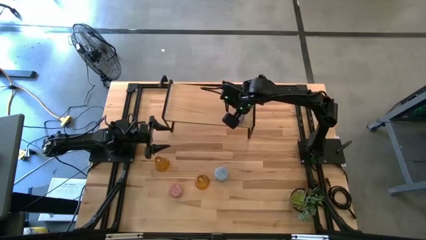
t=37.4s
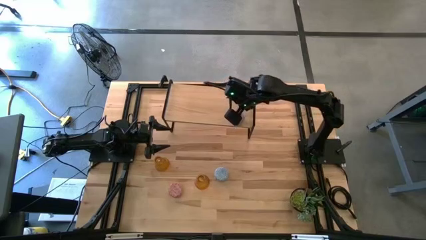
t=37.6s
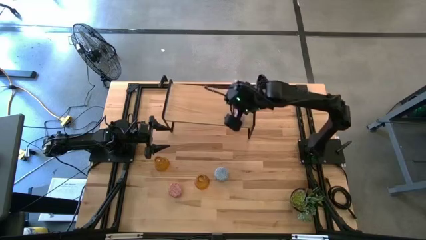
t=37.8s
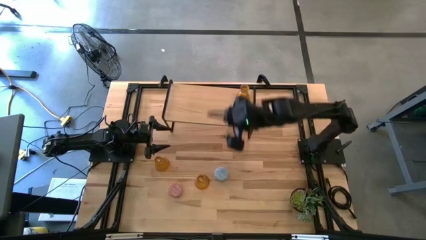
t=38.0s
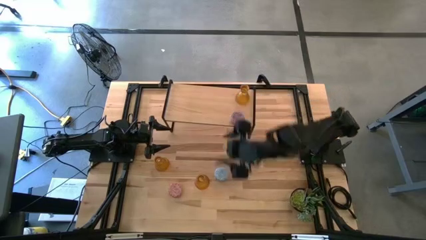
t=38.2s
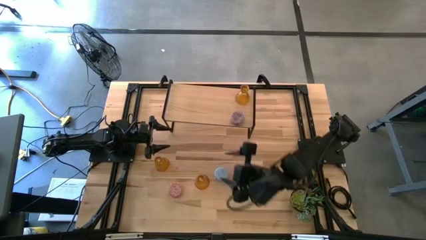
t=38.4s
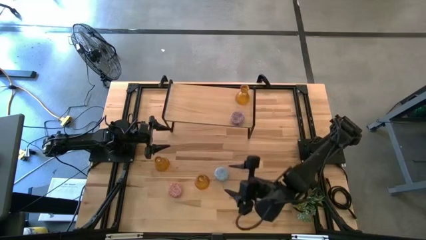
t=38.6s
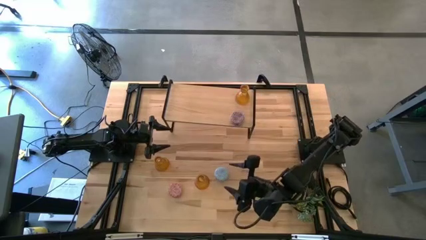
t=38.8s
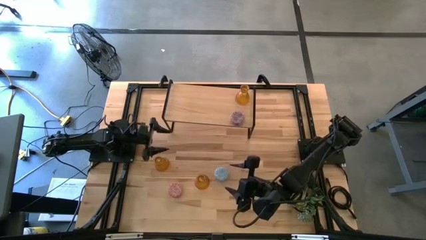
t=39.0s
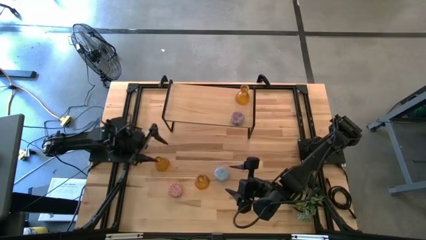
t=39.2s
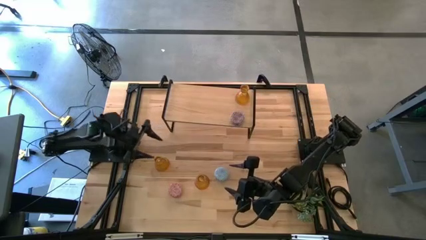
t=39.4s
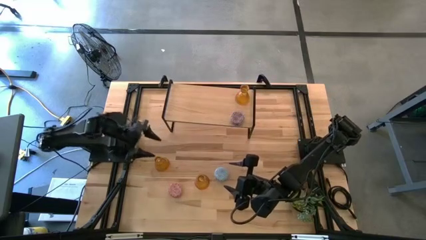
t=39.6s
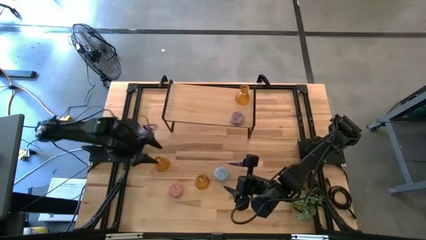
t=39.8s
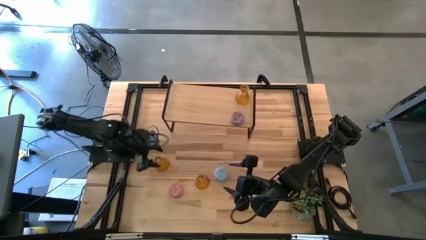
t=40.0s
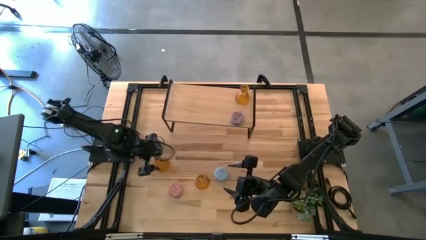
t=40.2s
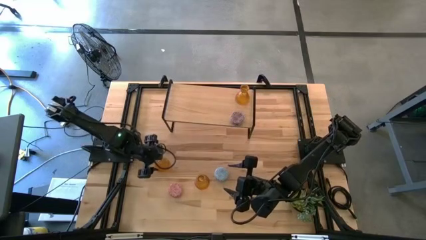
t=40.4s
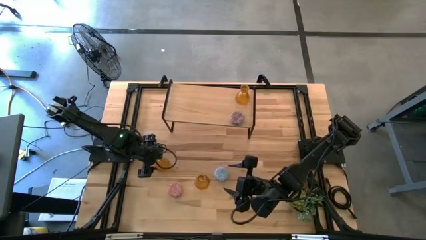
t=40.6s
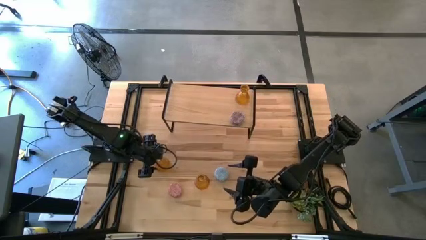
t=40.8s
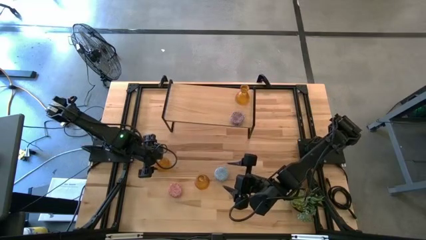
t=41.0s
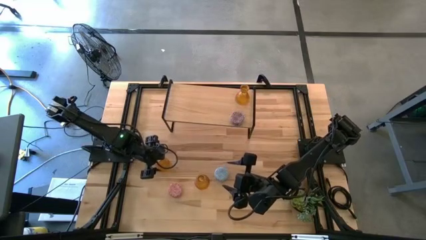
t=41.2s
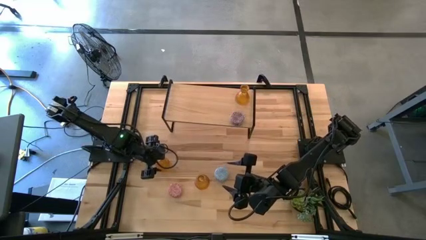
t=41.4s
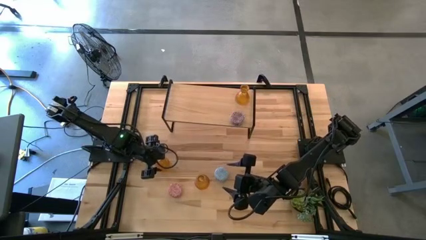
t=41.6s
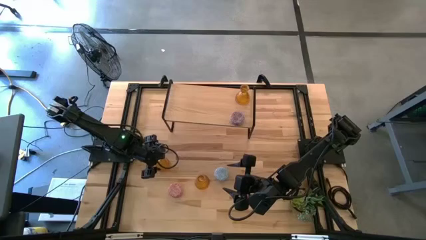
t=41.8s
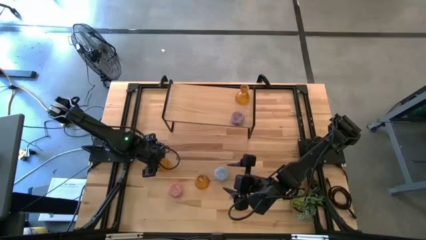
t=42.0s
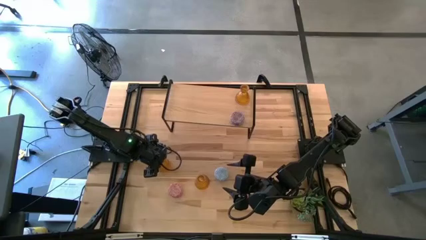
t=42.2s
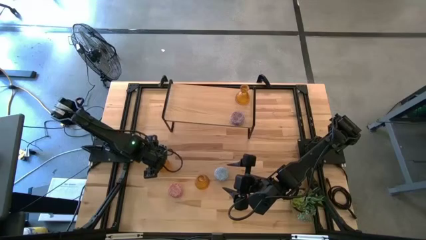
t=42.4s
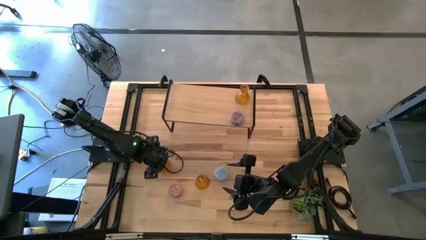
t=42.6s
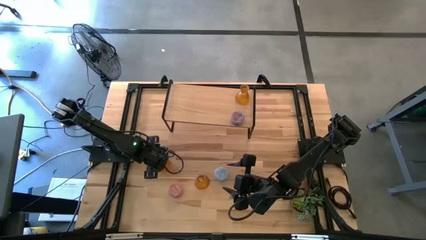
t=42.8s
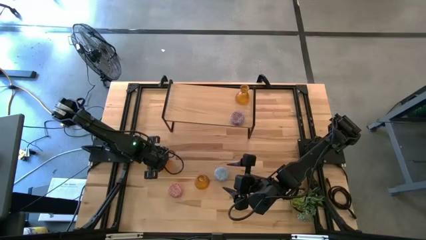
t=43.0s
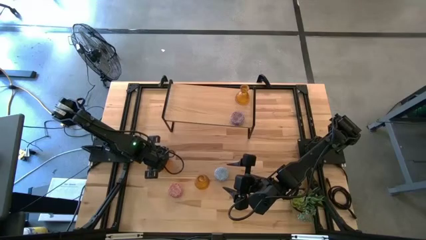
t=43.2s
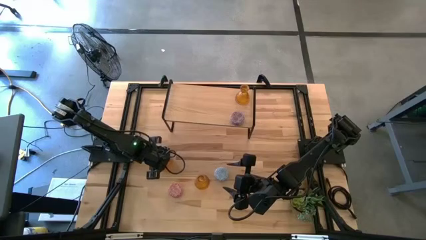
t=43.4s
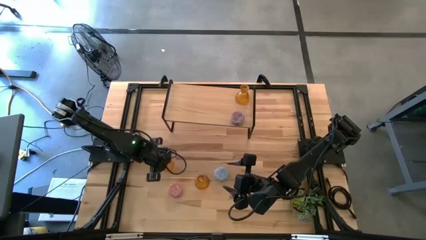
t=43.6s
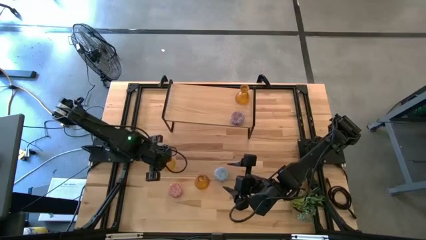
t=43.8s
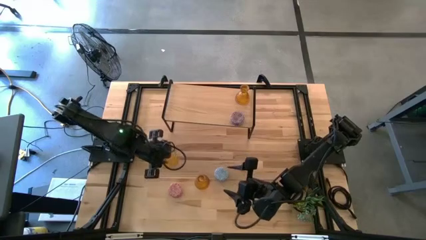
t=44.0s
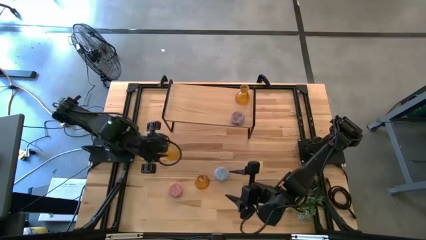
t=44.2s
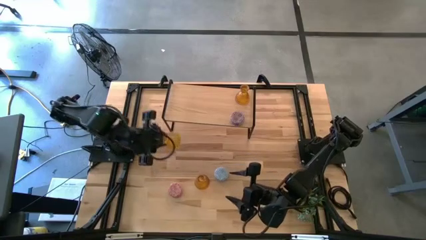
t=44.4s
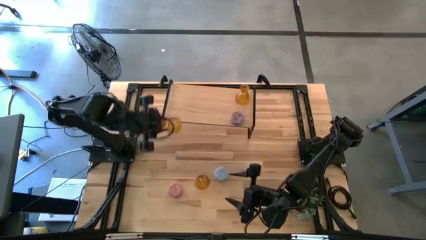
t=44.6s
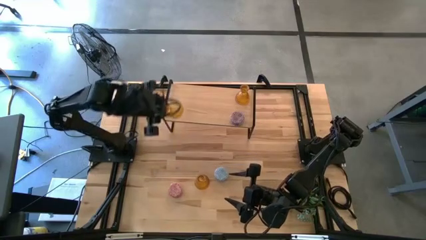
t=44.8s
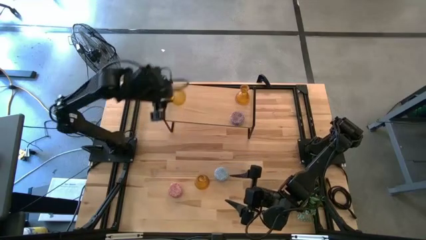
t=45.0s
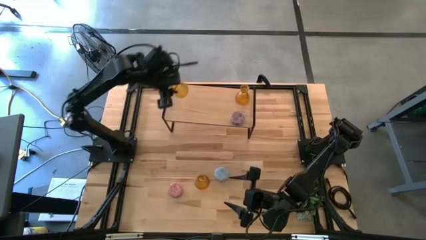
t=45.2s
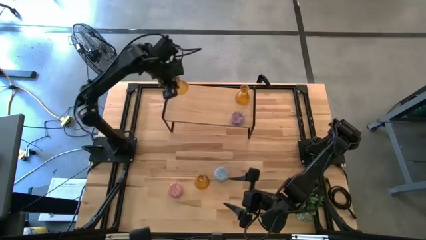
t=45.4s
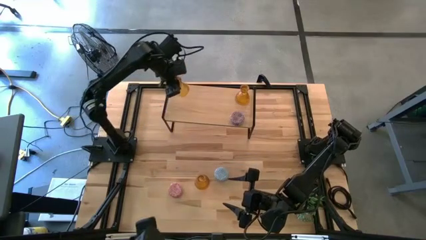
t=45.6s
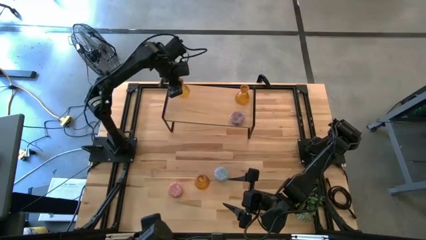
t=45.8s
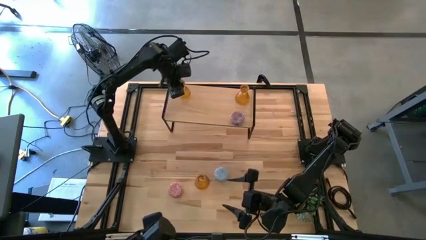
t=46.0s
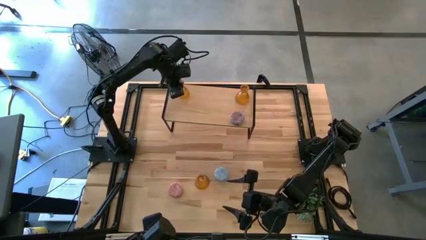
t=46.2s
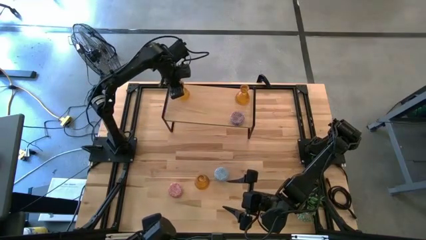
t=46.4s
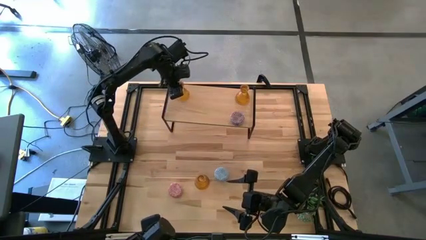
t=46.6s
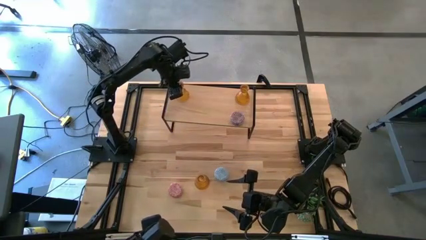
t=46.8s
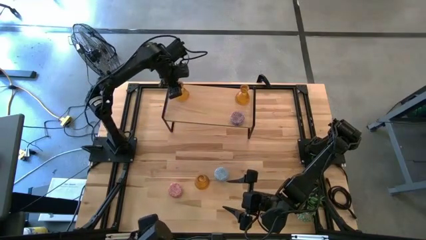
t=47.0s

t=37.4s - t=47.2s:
Task: Pick & Place candle stick holders
Put the left yellow candle holder on the shelf aligned with the yellow candle holder
